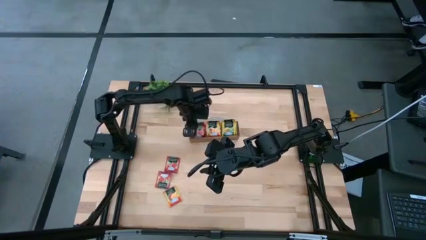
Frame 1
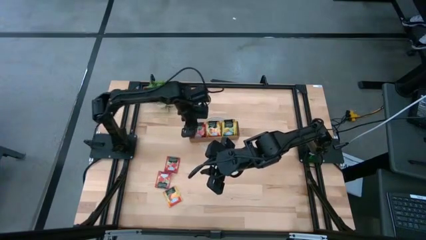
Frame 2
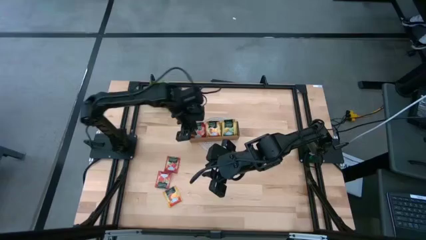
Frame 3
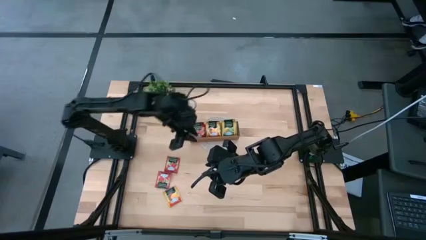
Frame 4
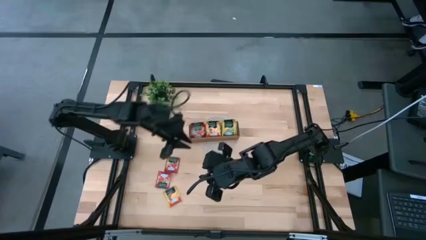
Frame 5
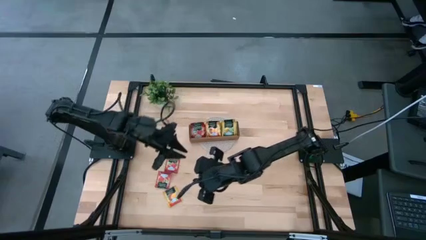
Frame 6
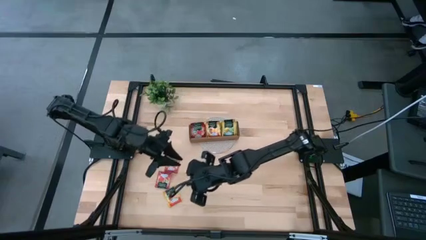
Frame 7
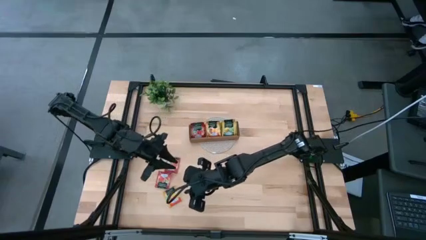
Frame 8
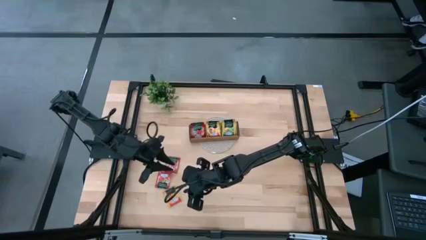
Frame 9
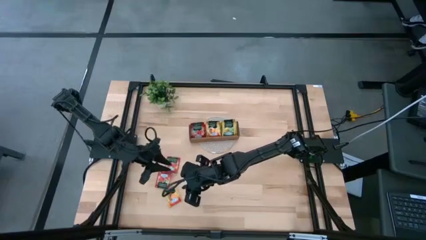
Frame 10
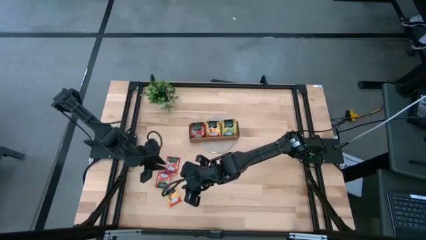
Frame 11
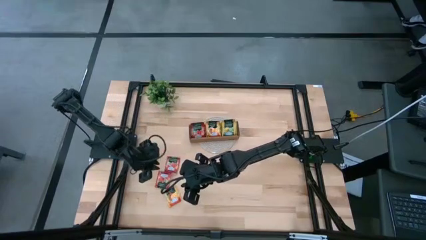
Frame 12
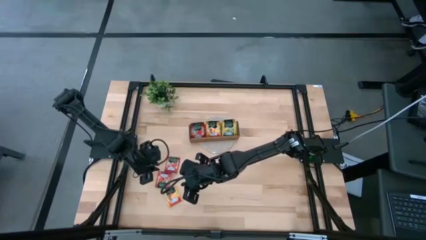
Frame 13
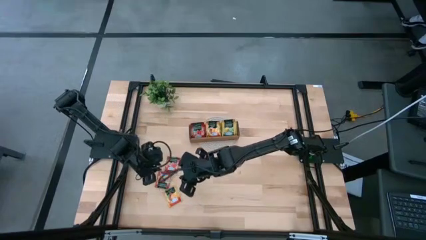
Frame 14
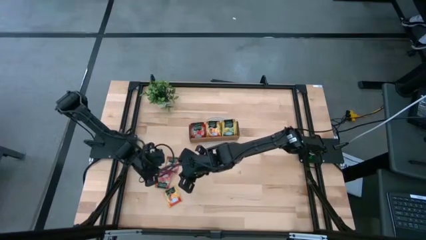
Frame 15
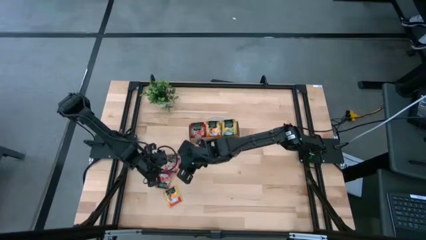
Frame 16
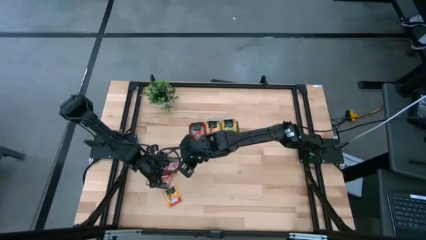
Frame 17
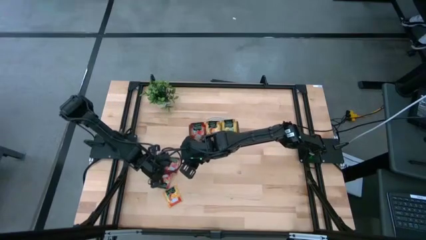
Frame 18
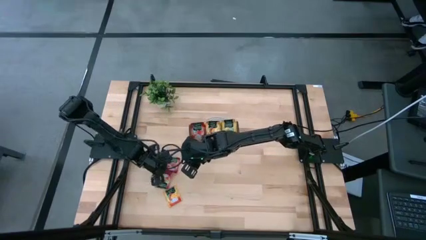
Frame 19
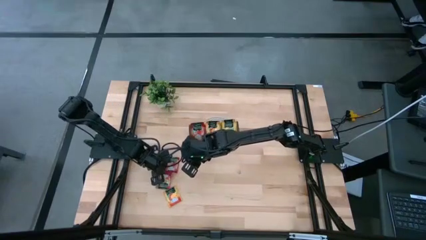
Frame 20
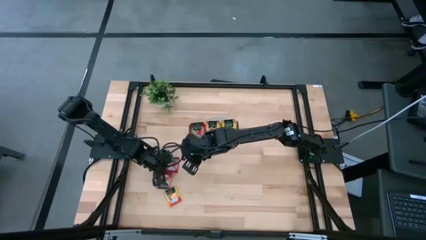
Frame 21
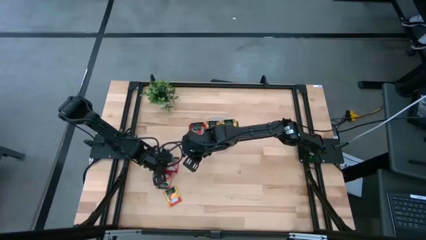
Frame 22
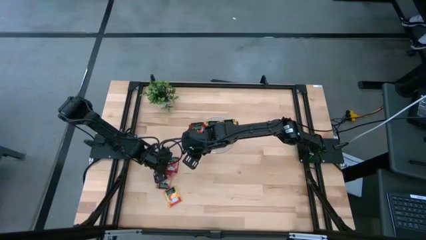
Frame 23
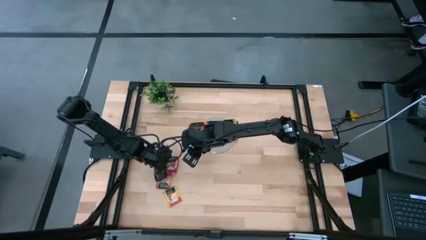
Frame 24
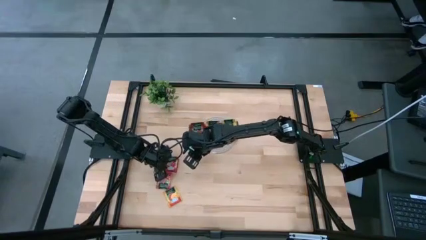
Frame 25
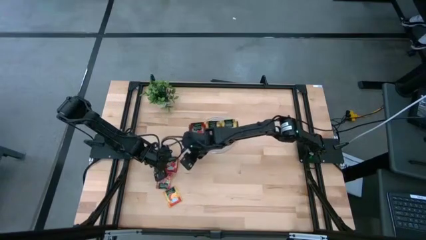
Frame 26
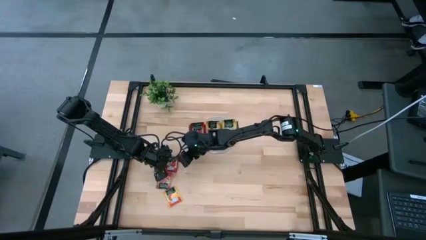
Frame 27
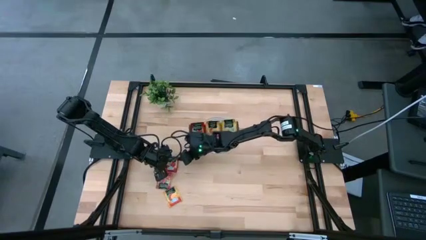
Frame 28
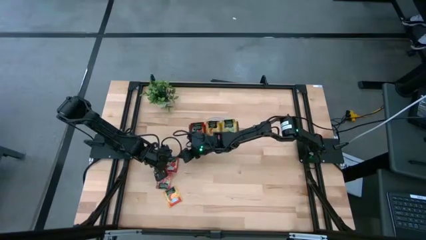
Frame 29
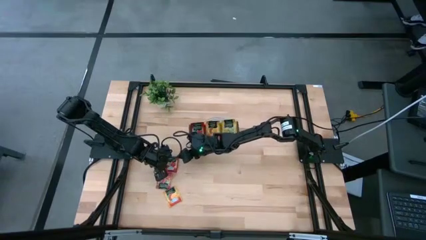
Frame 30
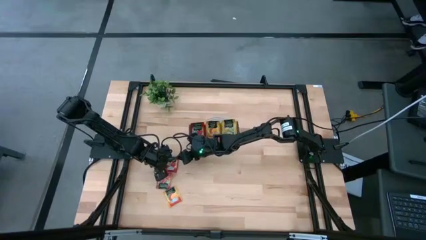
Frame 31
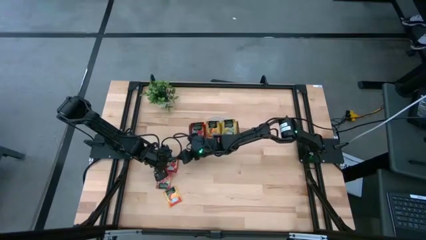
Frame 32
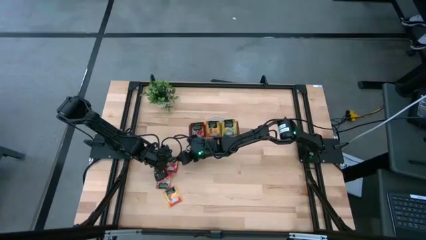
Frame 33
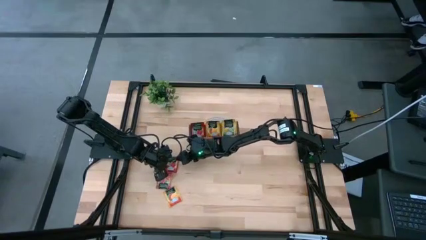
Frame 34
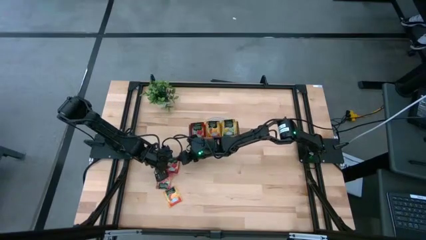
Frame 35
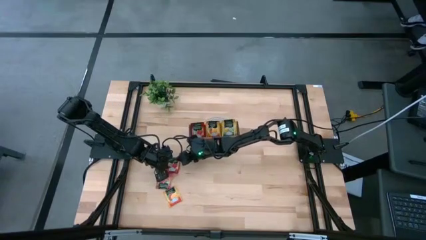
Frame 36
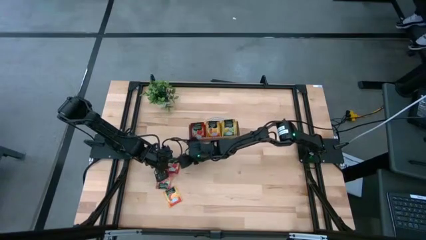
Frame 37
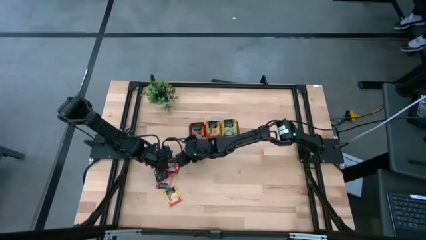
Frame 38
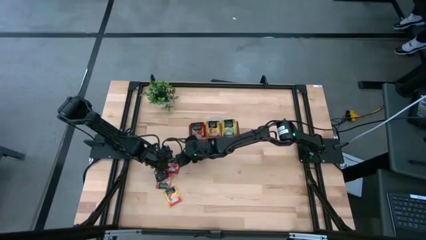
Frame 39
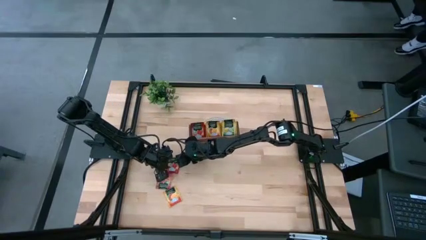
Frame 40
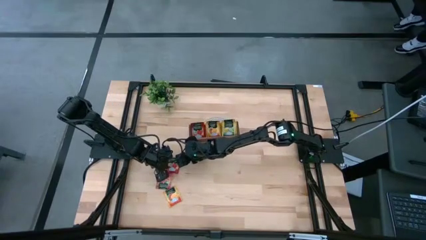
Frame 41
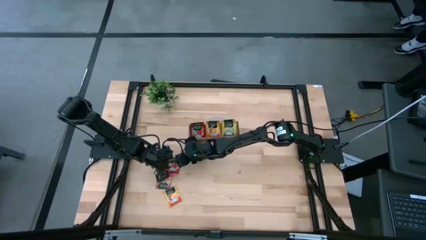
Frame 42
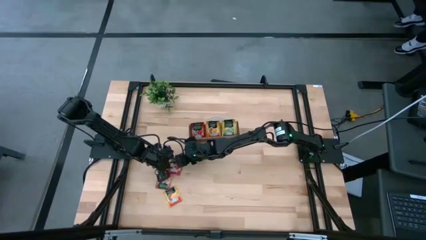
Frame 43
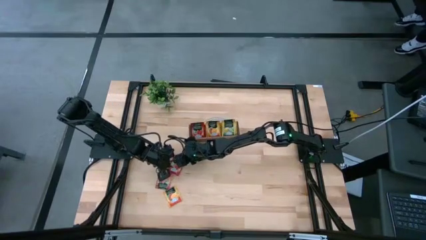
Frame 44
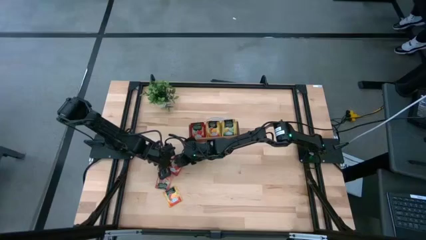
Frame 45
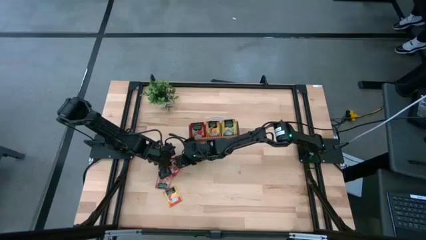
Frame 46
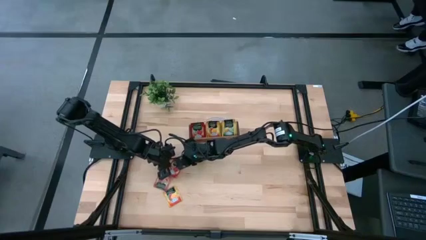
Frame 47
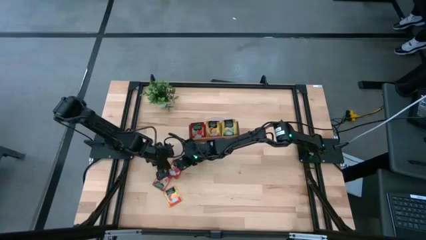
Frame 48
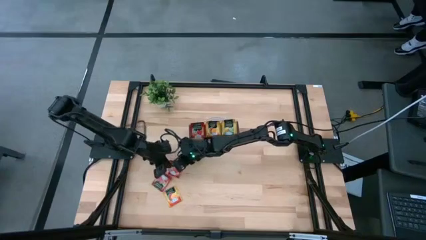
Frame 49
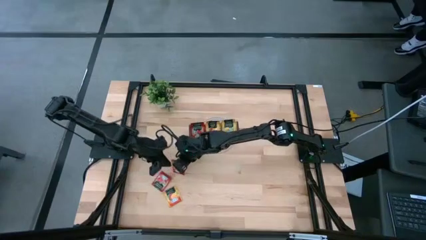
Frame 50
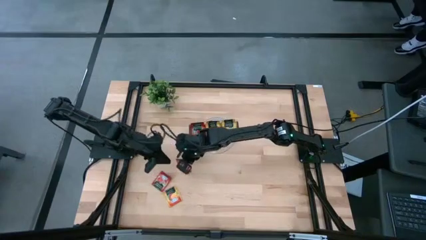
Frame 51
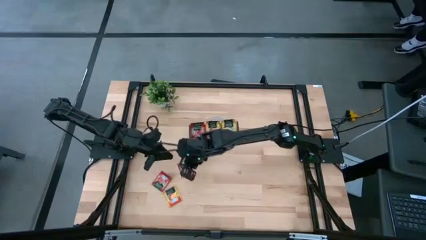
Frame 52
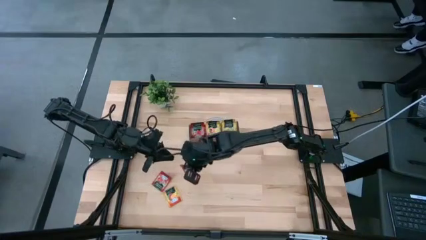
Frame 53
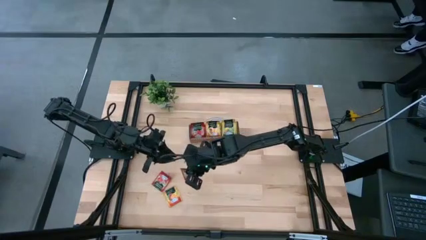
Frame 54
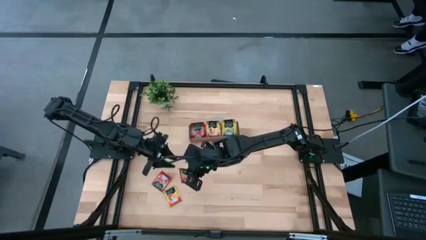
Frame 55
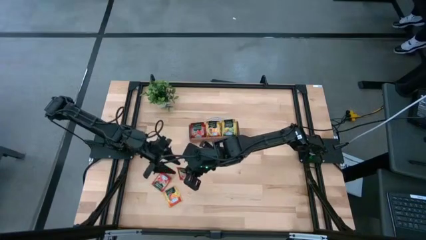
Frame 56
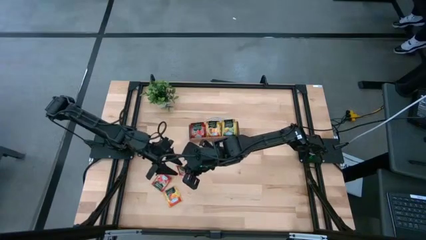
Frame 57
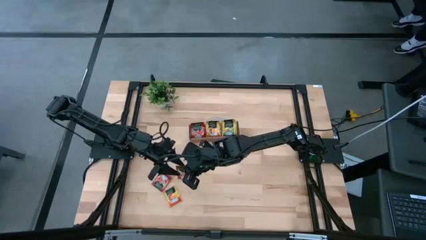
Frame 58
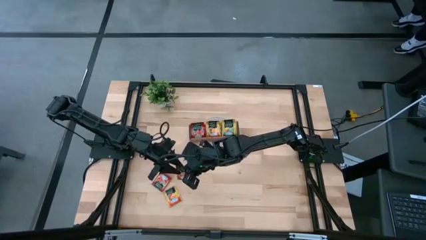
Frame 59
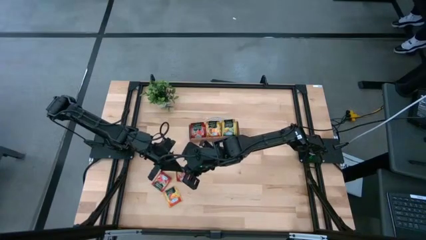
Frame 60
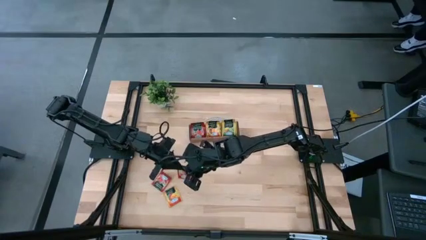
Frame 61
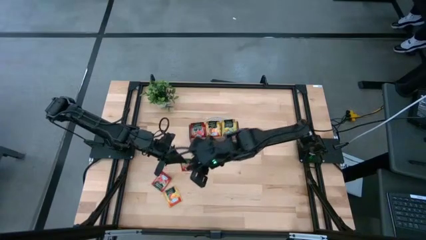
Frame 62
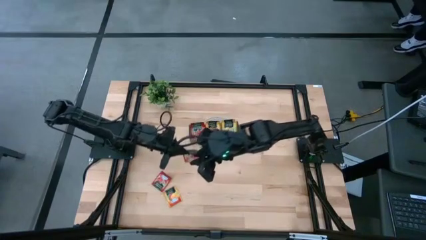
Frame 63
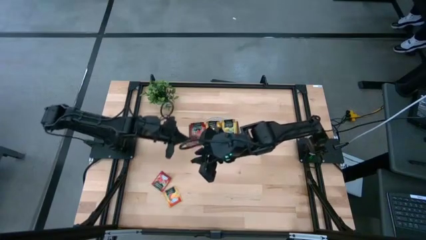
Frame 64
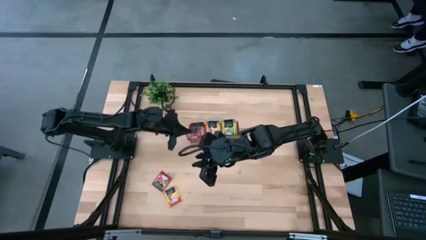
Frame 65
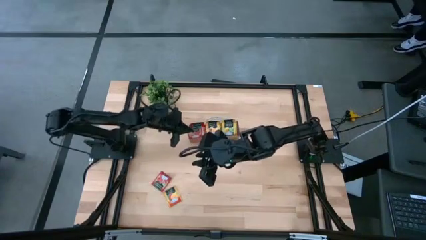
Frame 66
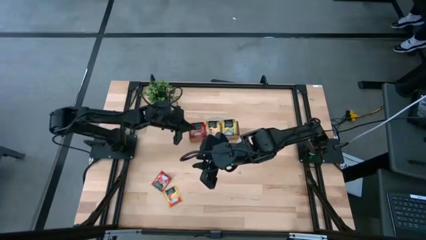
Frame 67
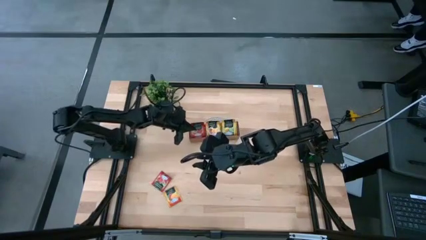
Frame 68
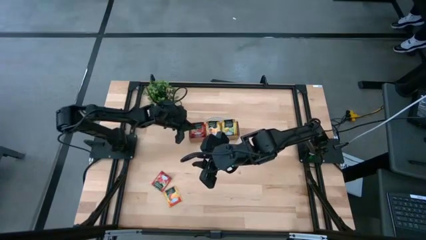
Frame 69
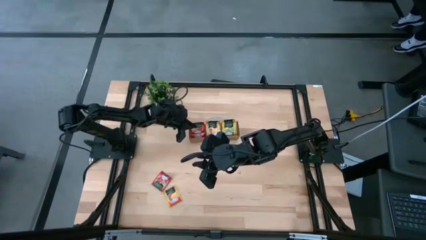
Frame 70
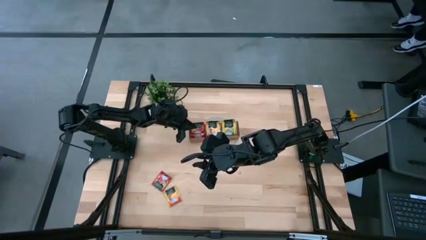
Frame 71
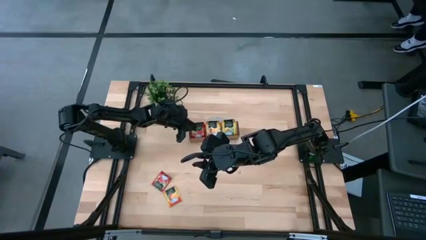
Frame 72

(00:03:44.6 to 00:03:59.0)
Task: Pick & Place Tea
Put the red tea bag into the left section of the wooden organizer

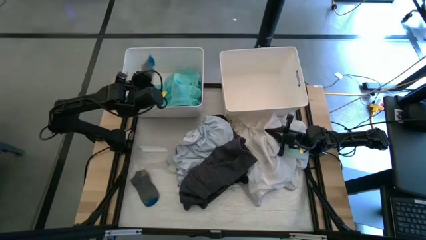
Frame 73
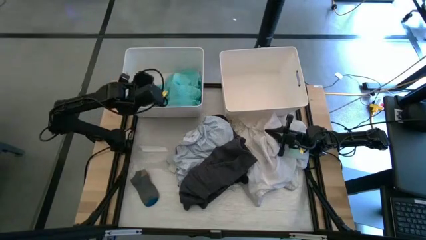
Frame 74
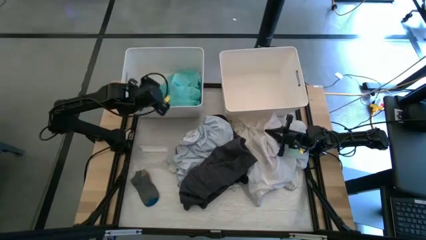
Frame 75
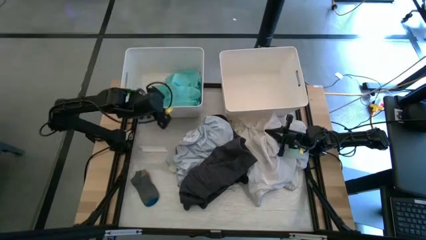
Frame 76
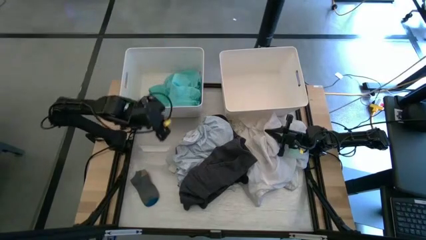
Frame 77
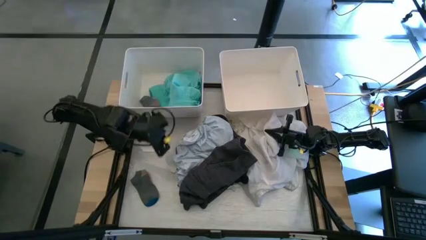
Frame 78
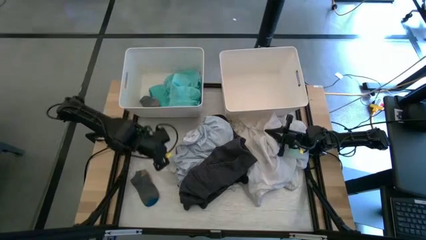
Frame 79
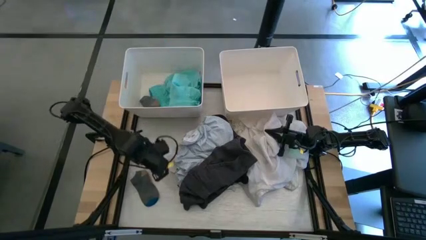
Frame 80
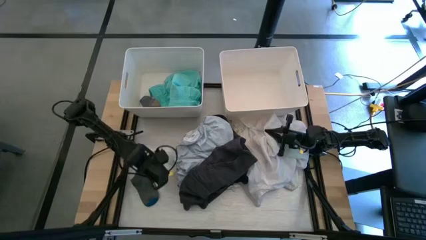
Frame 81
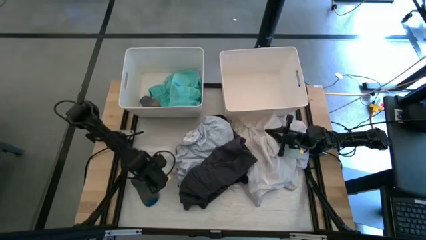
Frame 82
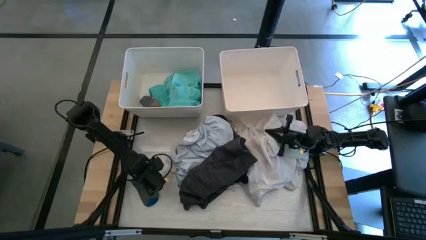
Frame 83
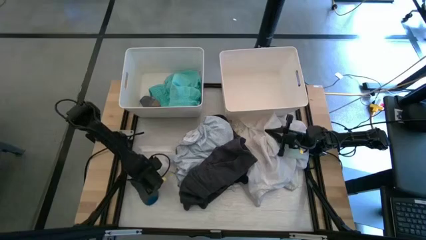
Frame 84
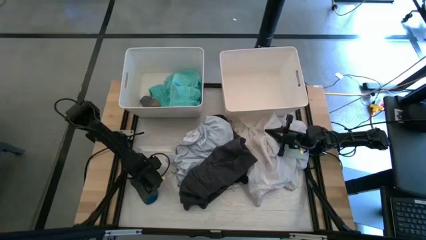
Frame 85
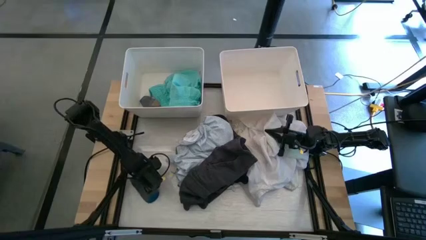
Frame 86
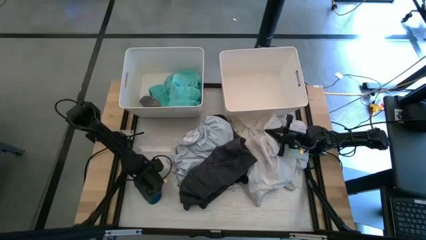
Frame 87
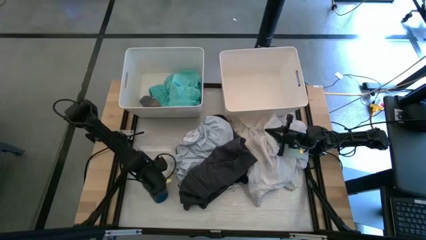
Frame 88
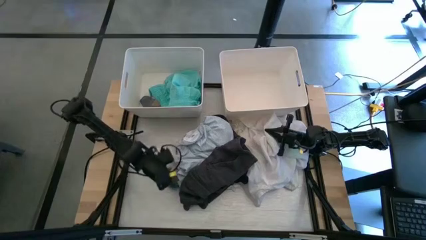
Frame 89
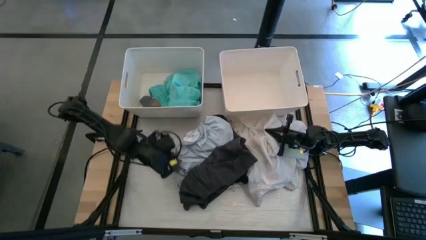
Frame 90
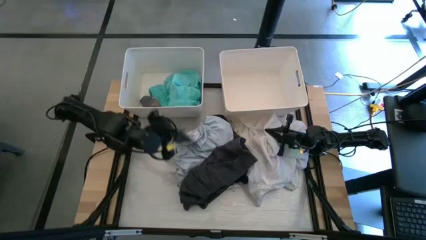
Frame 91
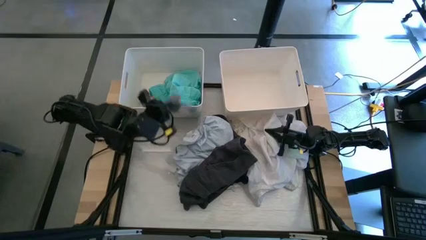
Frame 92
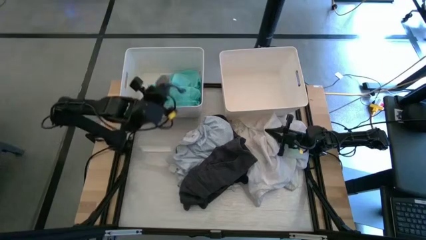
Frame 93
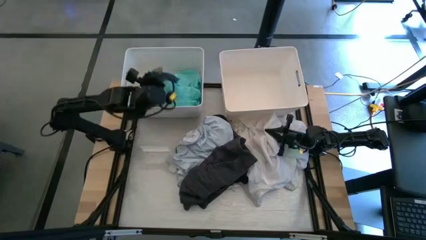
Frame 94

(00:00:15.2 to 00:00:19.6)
Task: Sort clothes
Put the gray sock into the left white laundry bin
